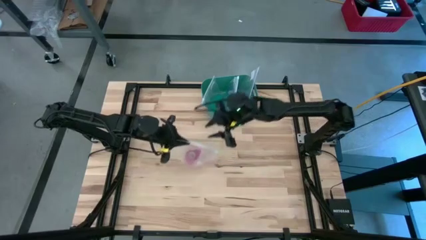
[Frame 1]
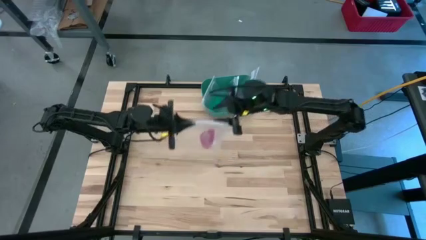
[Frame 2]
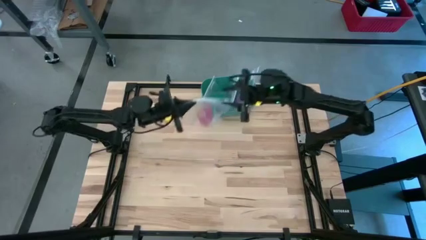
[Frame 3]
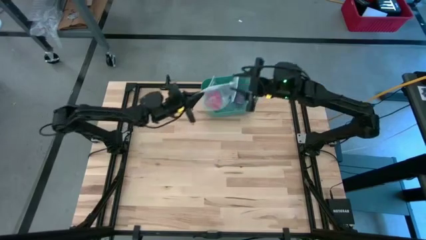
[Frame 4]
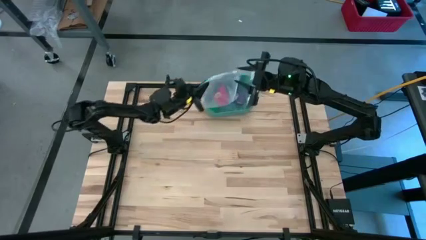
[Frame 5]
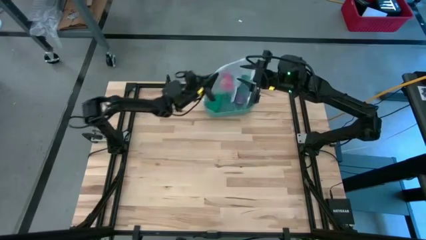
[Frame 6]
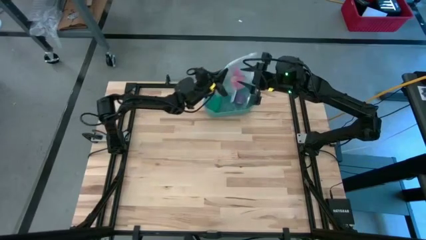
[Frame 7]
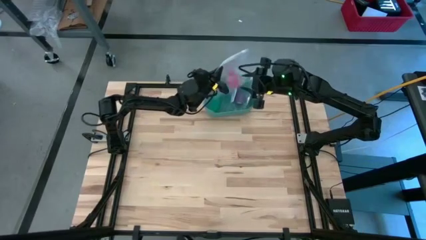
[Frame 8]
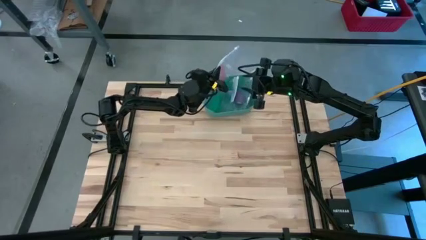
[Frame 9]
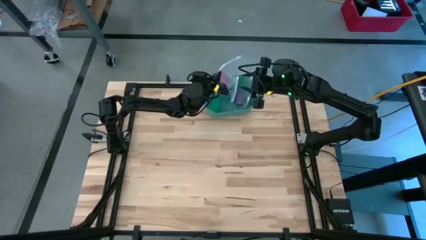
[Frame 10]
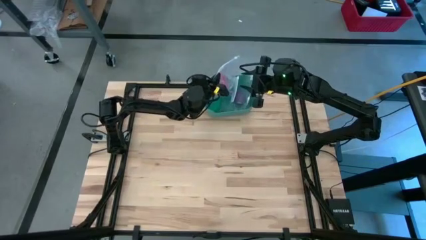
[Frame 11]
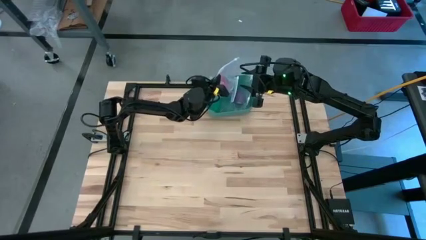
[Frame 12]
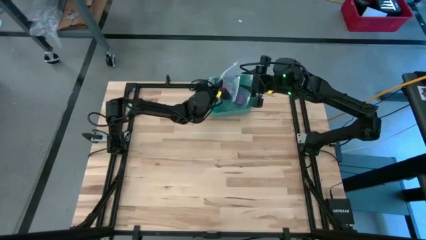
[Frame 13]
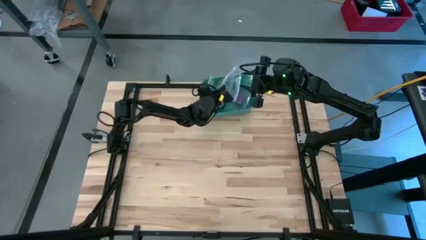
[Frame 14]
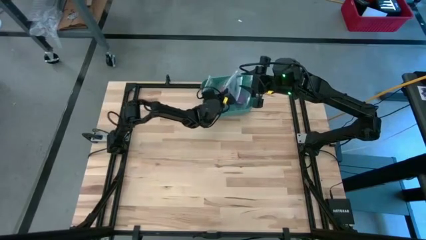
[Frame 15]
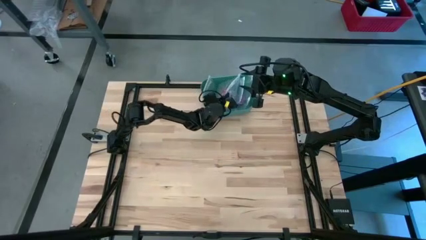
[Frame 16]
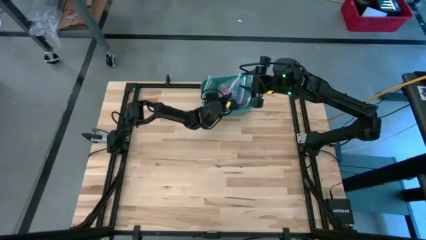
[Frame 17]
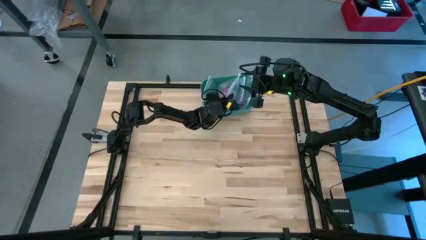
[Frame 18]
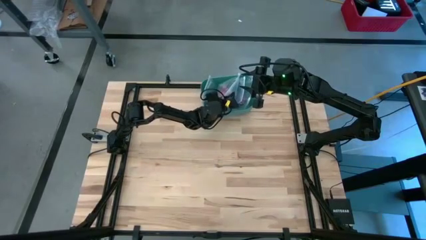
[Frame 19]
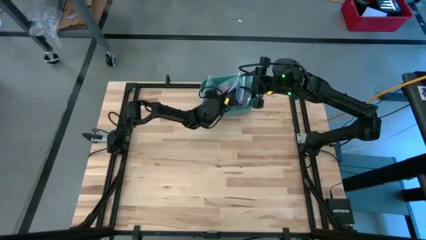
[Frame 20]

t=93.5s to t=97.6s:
Task: Roll bandage
Put the transparent zip bag into the green bin

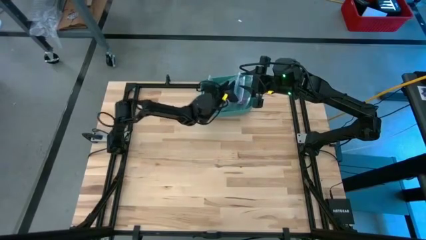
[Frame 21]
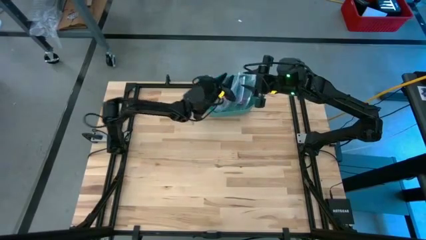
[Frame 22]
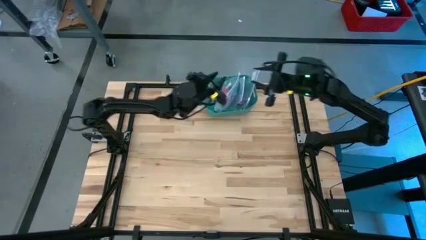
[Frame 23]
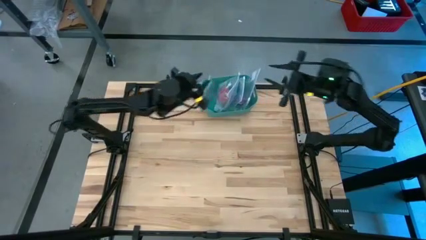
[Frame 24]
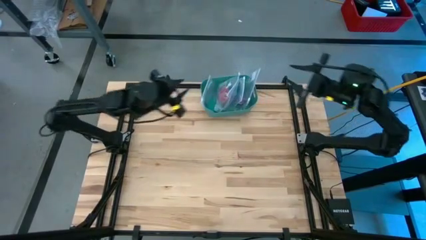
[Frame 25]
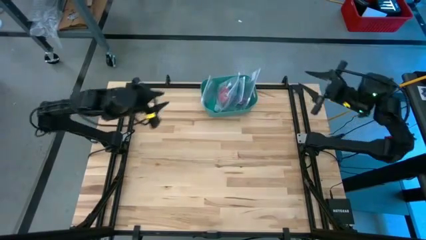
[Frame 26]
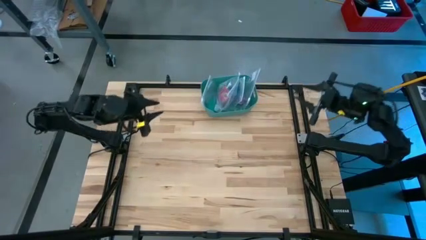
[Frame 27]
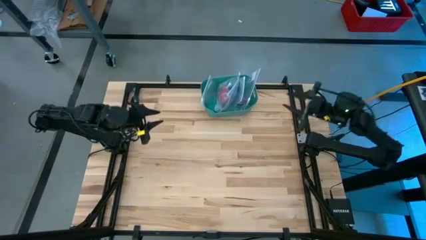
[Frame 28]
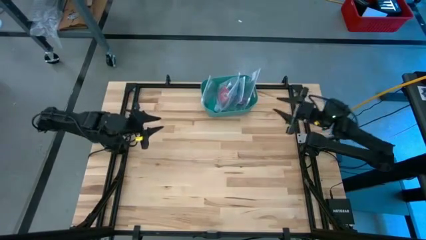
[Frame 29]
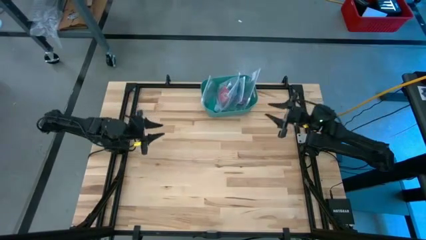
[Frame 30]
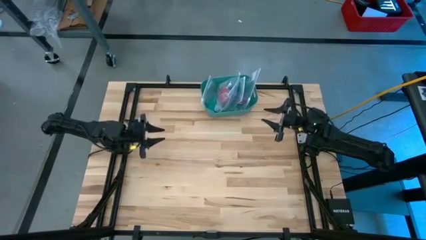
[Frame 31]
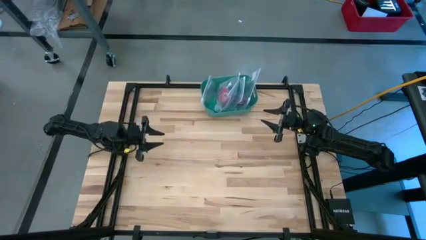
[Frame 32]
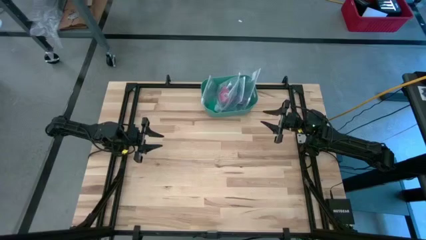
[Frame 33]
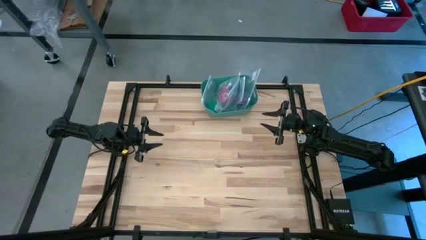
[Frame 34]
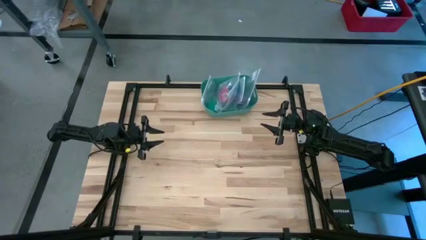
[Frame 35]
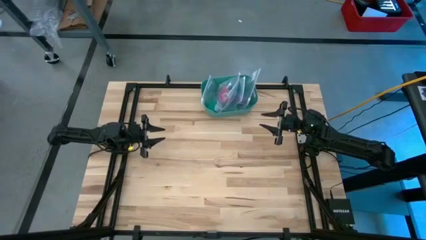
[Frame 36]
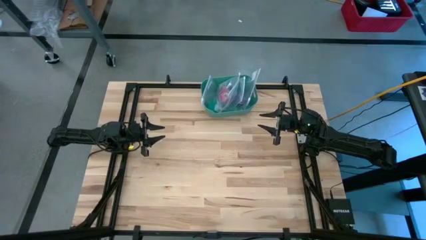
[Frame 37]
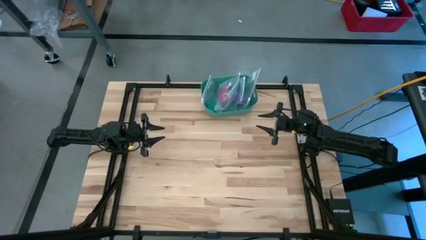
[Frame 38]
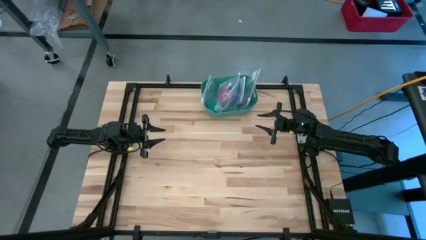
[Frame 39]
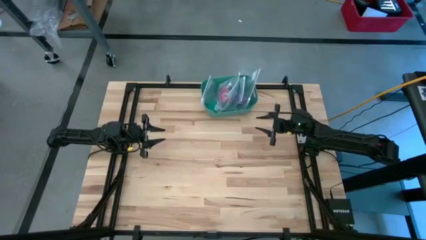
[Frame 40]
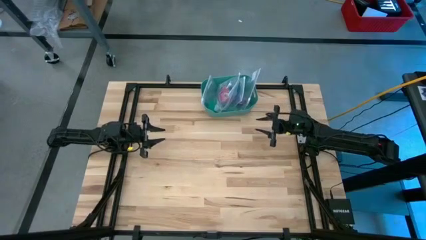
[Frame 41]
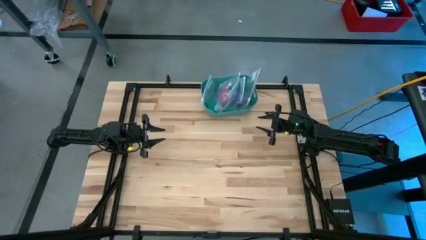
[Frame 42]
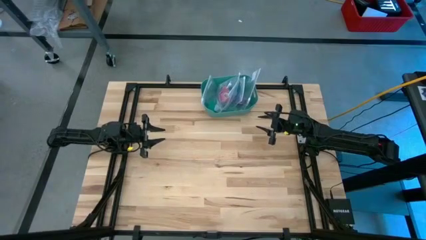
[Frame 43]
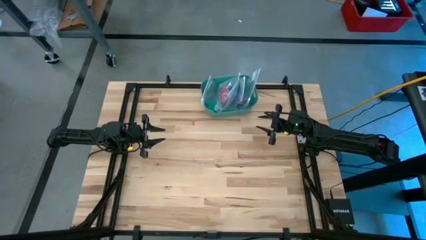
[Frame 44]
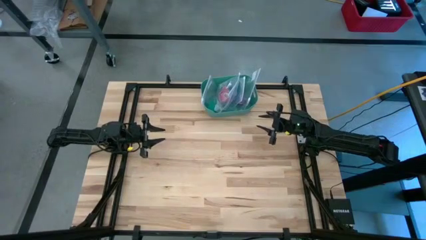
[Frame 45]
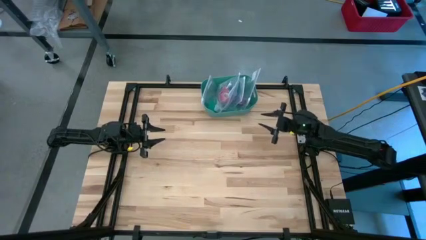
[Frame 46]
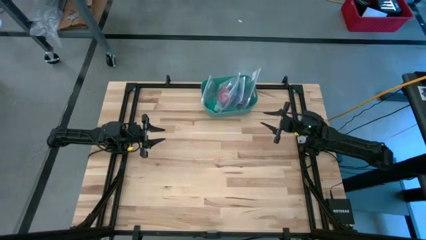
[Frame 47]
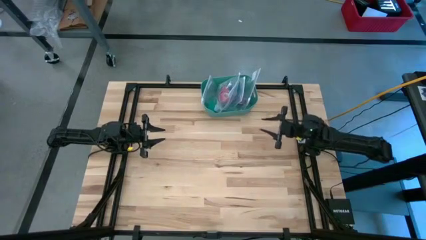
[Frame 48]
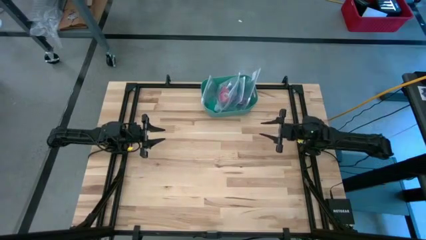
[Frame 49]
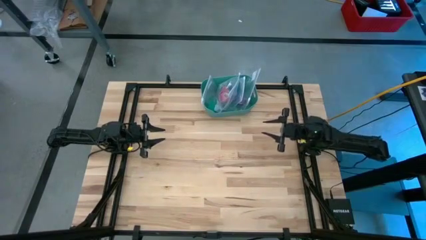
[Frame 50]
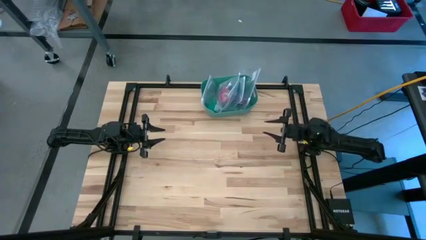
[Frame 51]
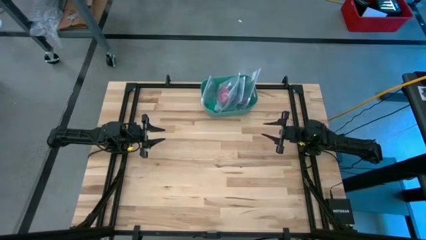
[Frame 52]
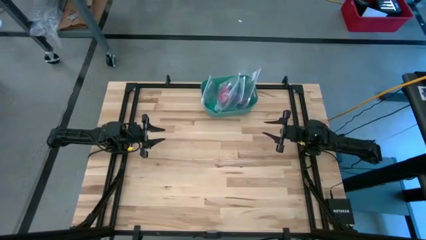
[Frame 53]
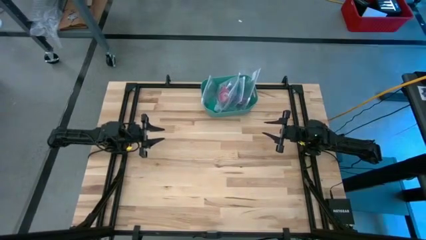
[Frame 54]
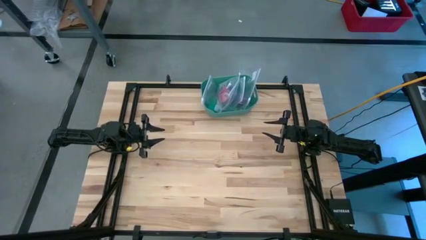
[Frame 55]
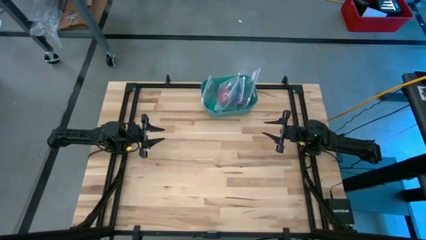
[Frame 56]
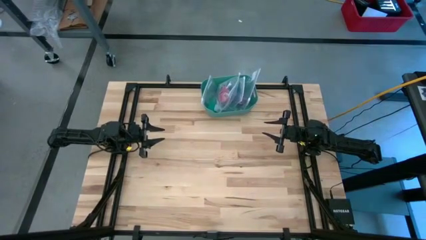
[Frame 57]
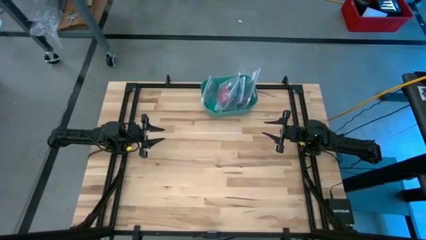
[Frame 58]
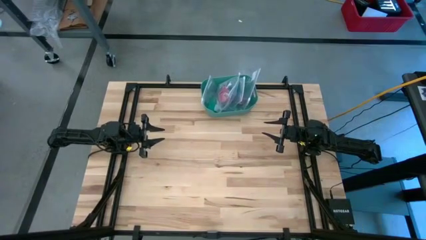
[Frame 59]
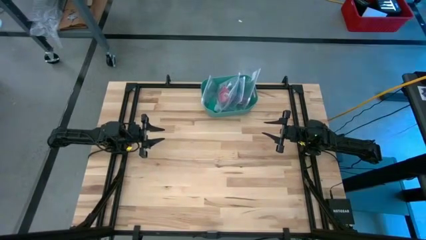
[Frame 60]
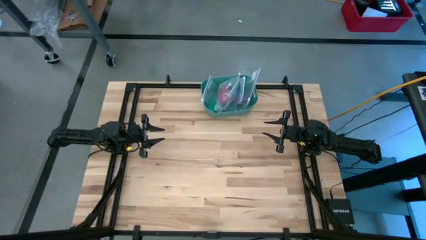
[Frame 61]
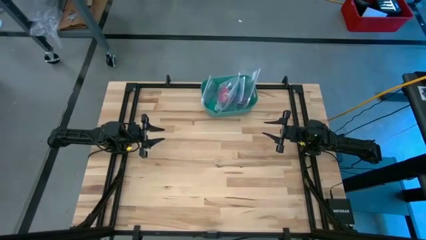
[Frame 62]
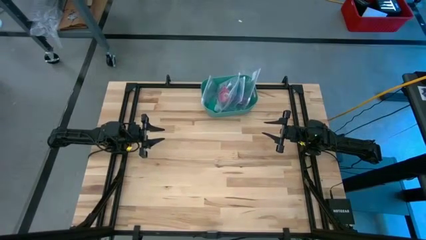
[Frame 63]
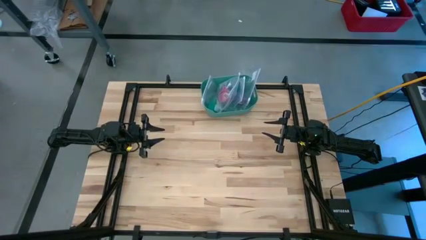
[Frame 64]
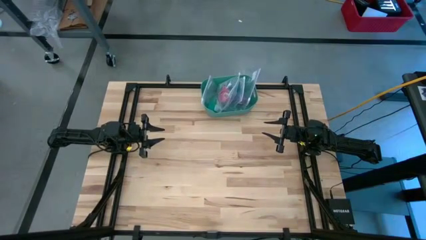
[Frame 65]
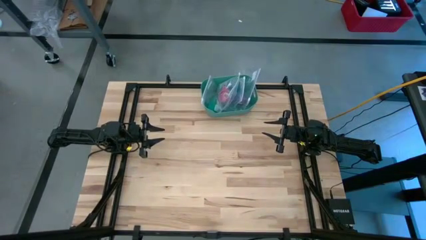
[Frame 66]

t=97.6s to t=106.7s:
Return to Home Position
